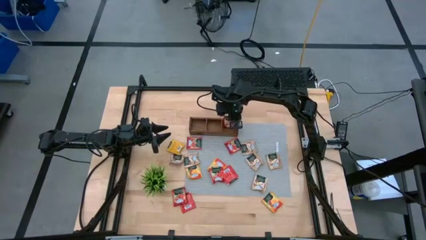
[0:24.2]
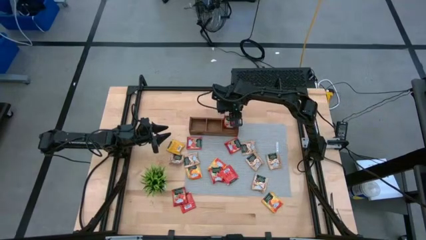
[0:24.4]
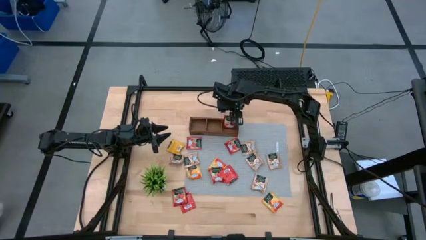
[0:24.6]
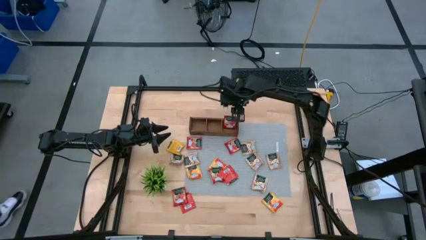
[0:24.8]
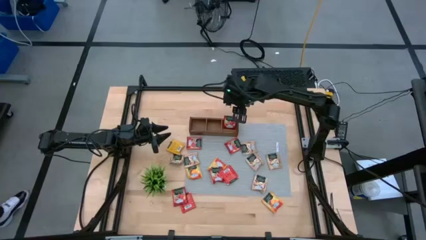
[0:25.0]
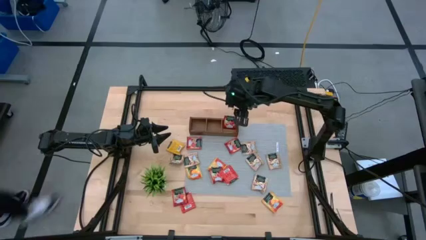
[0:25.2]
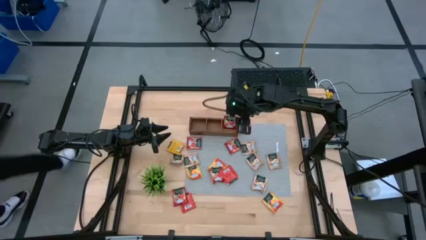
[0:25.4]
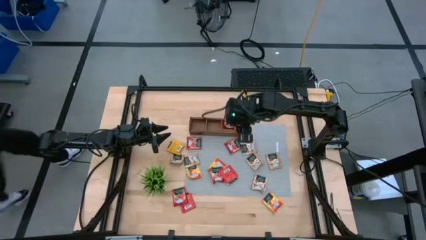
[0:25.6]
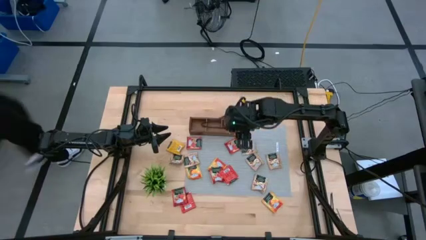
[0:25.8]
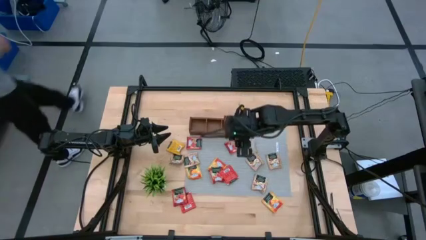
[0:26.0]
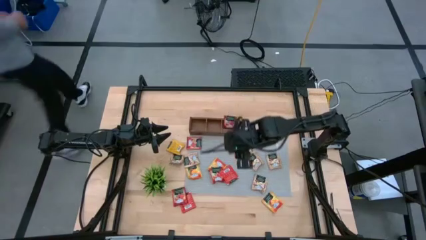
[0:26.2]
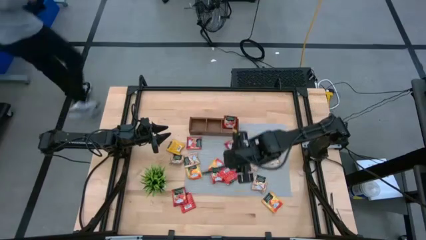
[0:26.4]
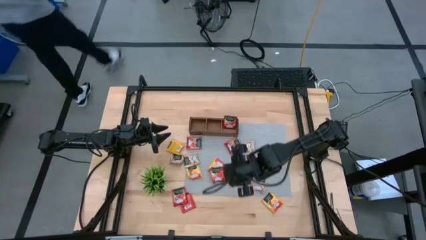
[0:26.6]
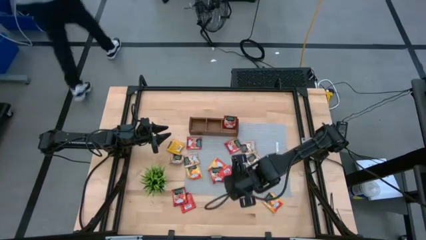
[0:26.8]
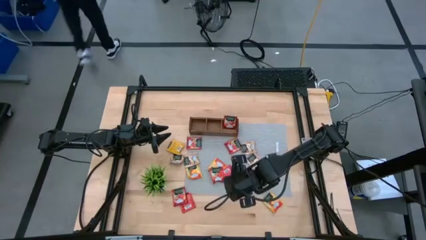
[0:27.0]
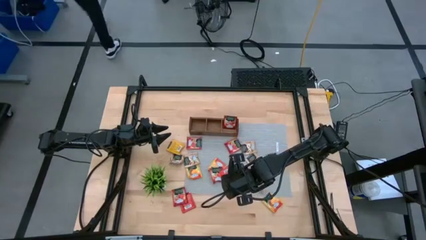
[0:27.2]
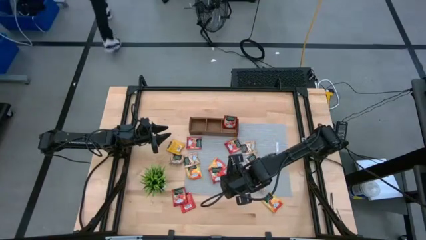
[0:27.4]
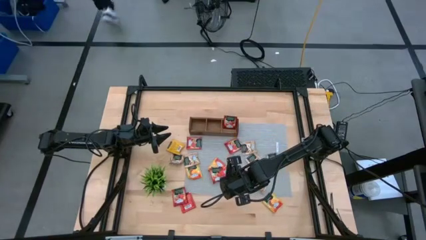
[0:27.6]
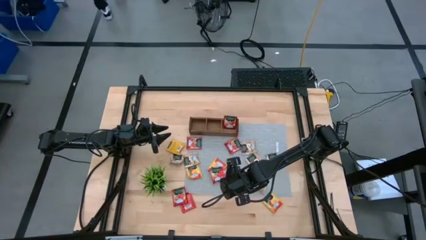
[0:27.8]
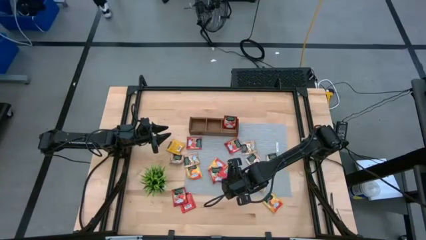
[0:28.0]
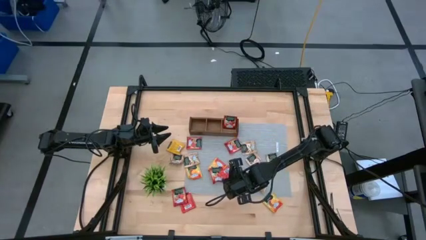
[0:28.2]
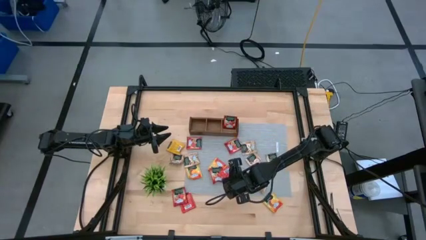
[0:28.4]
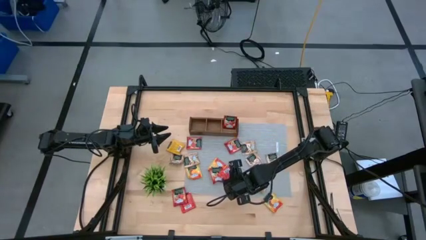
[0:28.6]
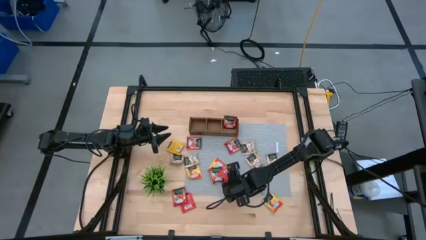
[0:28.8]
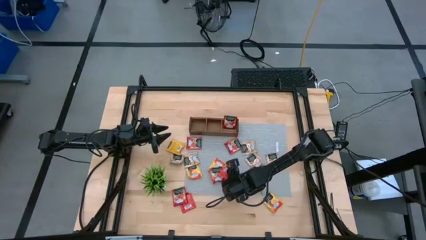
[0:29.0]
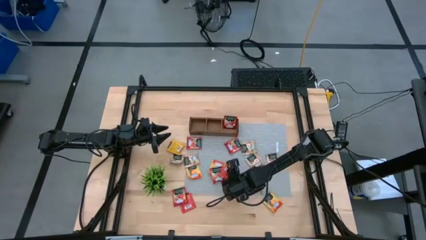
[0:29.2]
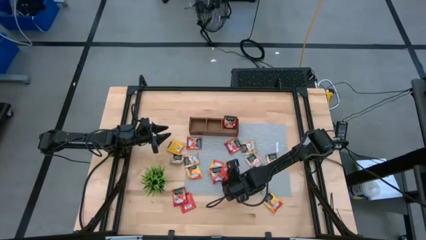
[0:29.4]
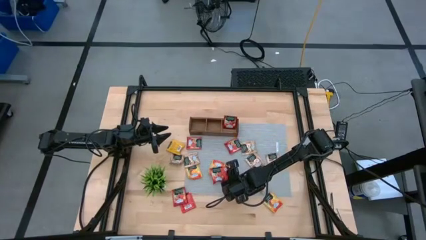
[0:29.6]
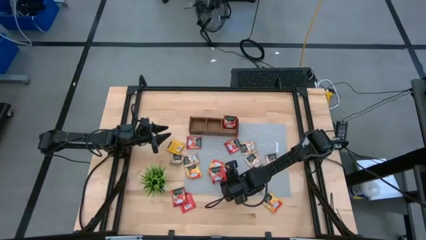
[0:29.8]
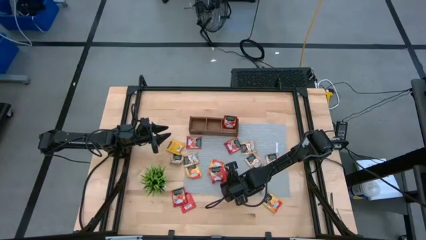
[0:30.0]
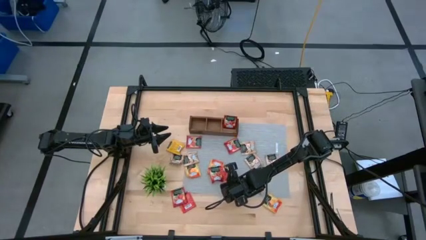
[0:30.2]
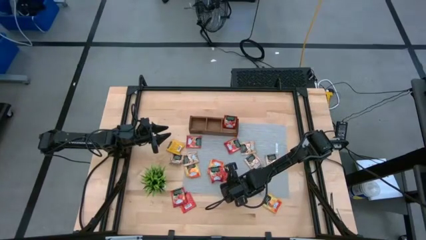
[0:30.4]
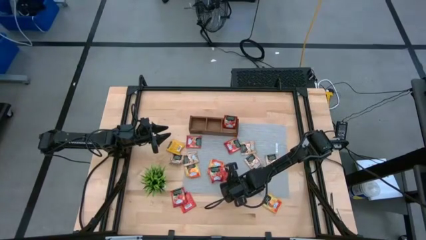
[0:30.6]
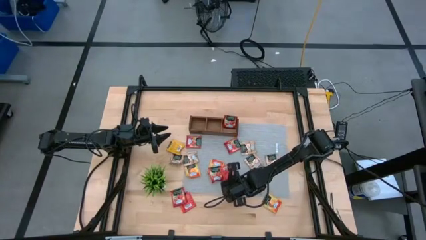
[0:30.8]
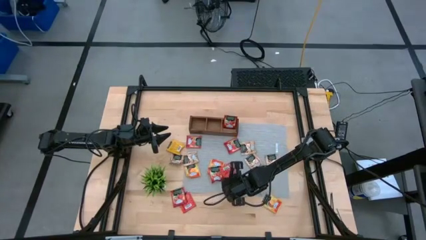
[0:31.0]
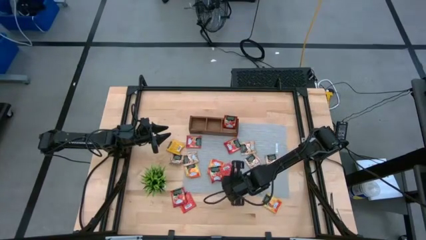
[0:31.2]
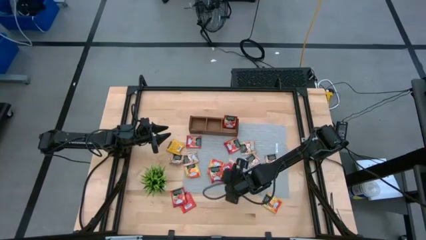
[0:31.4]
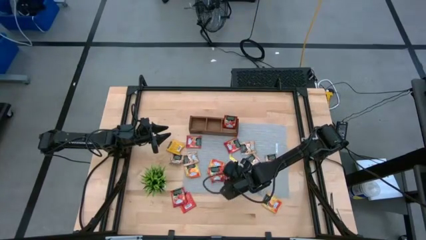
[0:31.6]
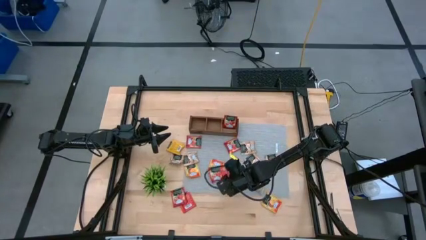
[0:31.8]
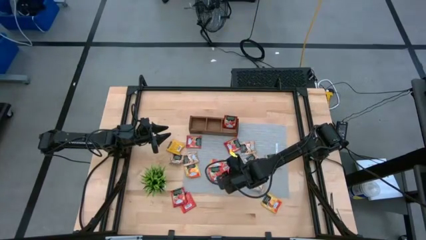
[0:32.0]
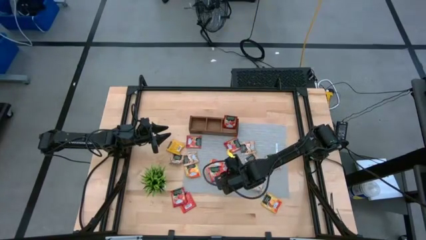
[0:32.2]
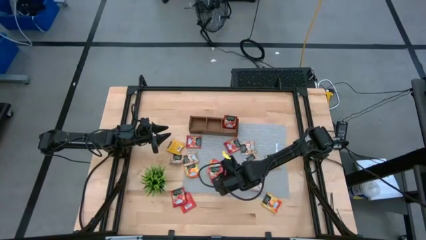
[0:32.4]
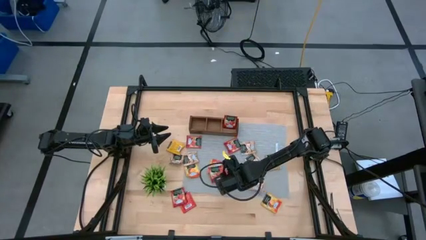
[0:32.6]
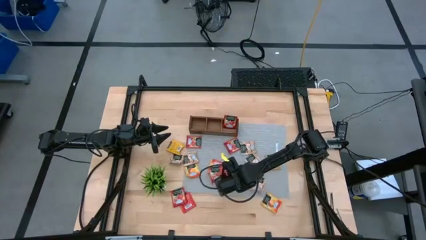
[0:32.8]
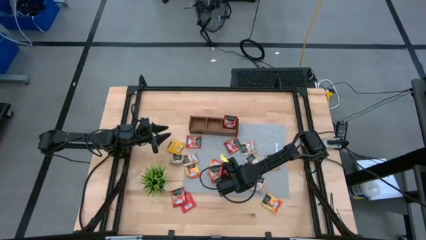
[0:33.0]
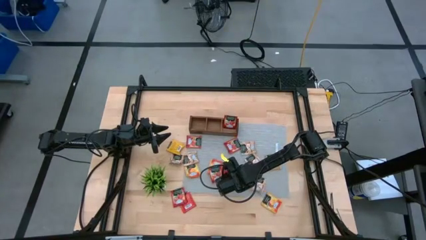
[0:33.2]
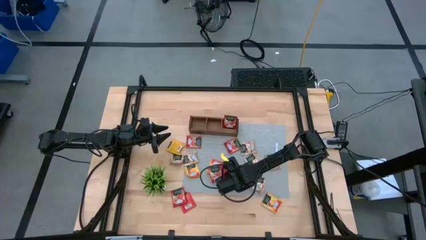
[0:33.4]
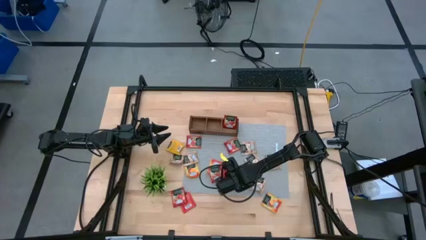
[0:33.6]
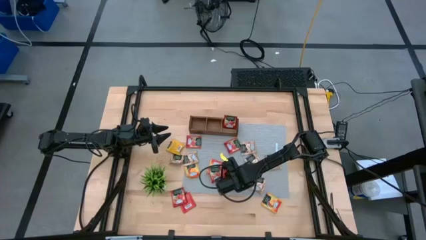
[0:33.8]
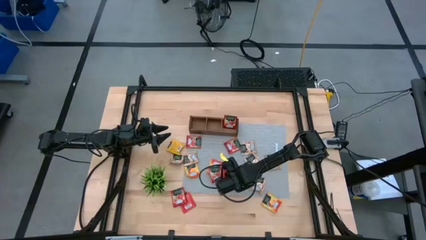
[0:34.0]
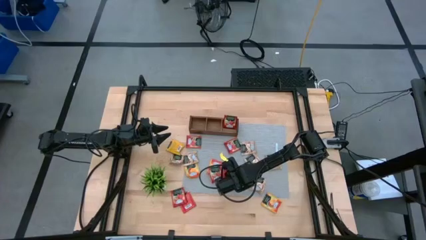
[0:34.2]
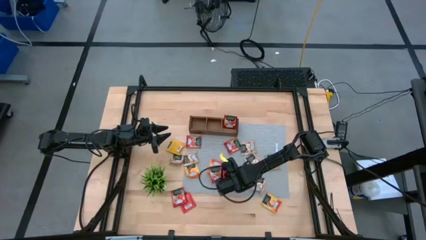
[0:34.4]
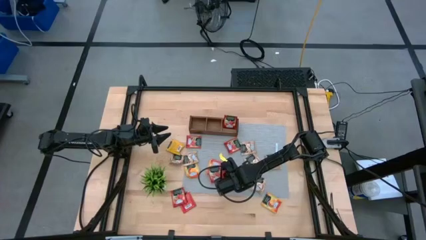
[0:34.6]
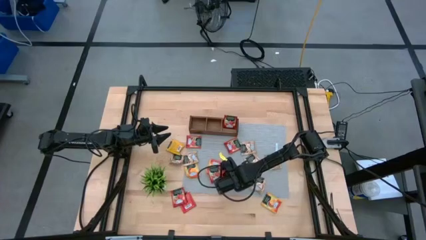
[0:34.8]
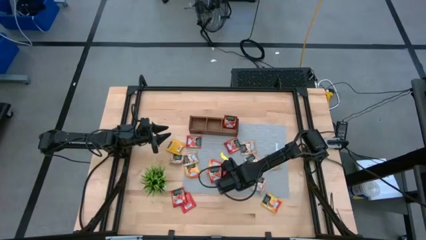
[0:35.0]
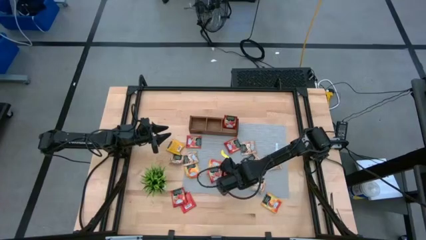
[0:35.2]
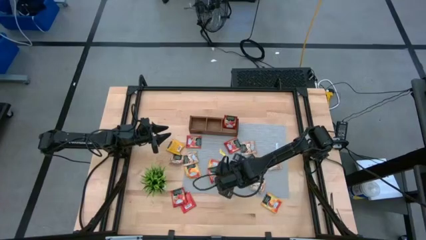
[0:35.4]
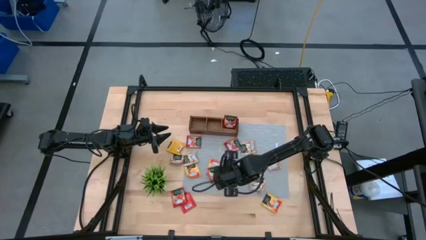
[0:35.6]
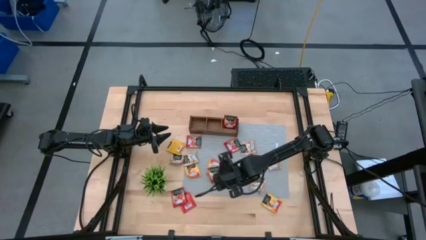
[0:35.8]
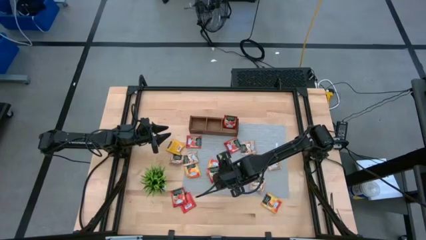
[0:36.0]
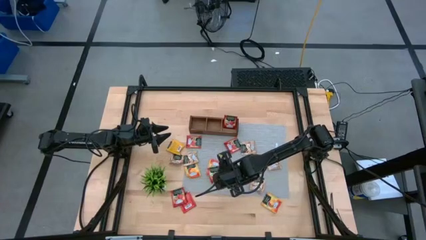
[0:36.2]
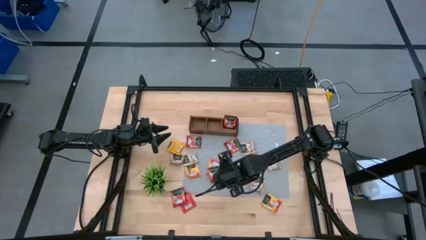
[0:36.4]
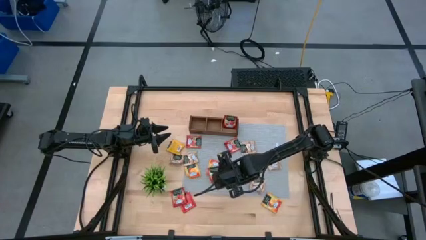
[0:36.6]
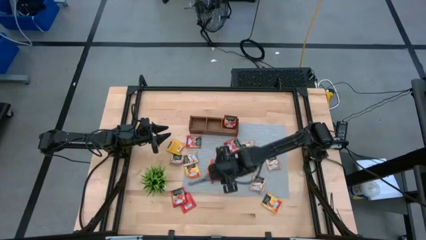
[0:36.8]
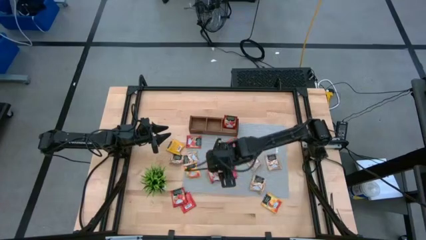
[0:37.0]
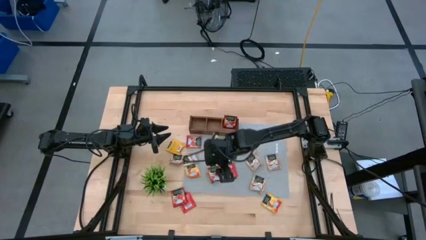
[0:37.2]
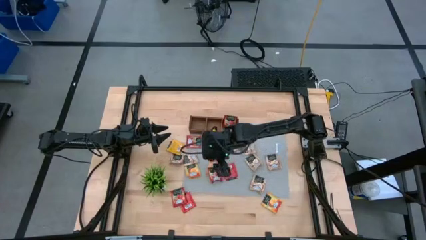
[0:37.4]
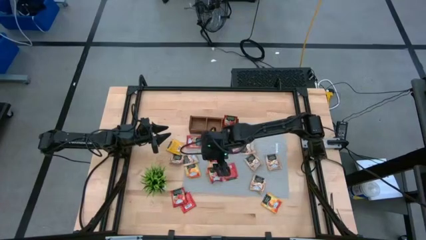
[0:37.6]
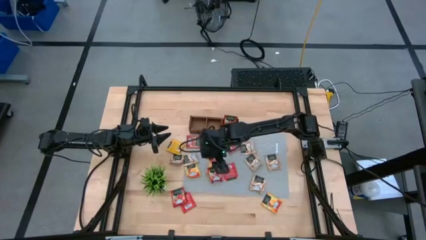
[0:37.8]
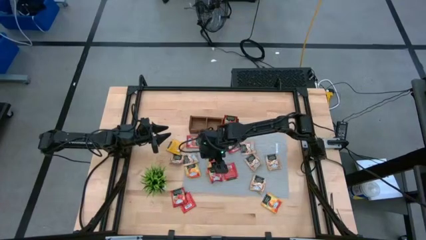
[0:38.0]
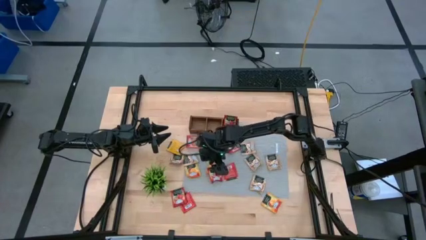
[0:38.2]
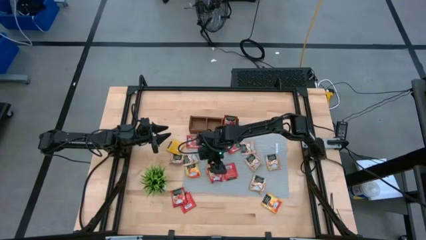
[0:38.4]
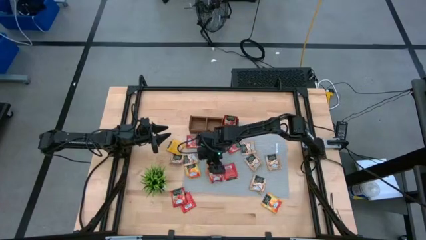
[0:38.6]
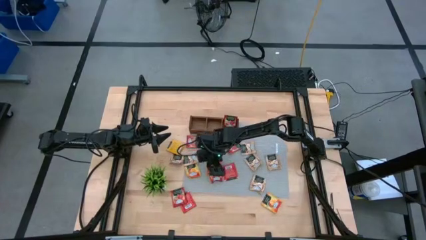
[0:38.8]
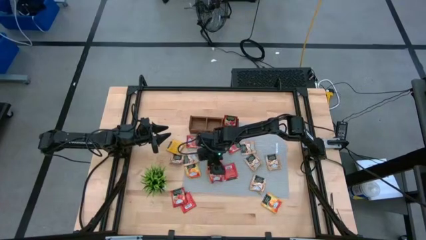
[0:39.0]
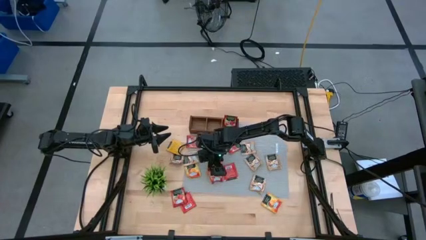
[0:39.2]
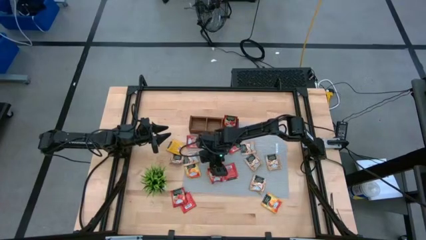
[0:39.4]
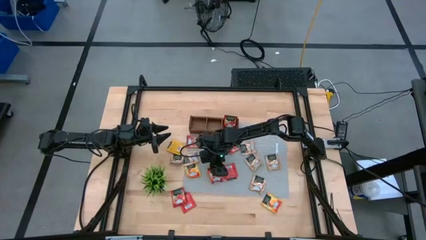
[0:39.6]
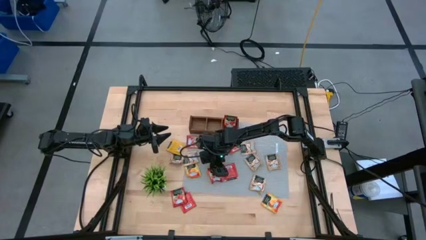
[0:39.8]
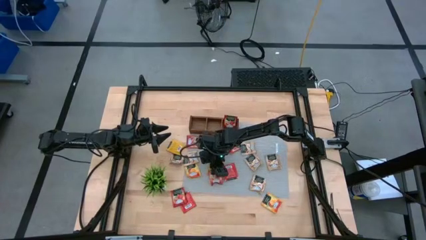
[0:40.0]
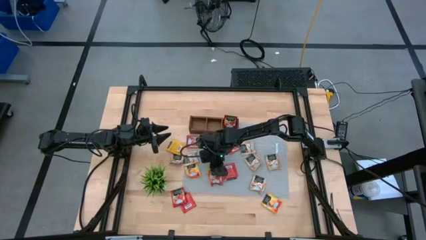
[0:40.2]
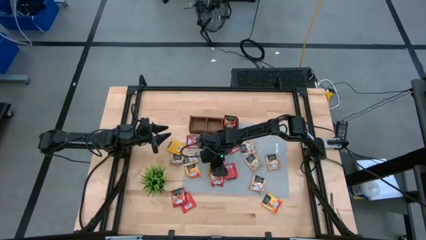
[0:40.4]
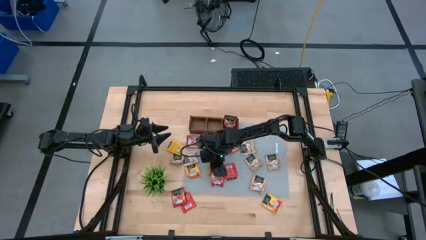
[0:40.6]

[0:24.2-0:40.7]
Task: Pick & Place Tea
Put the red tea bag into the right section of the wooden organizer
